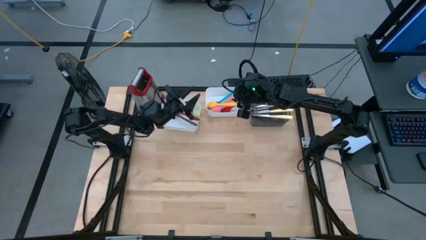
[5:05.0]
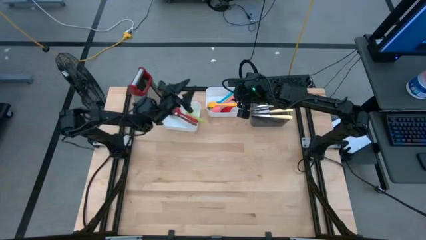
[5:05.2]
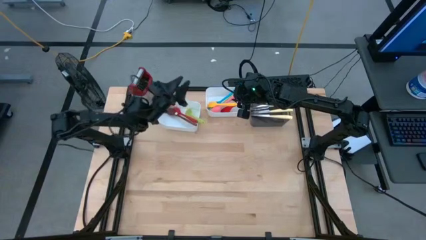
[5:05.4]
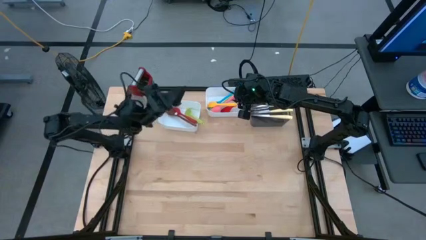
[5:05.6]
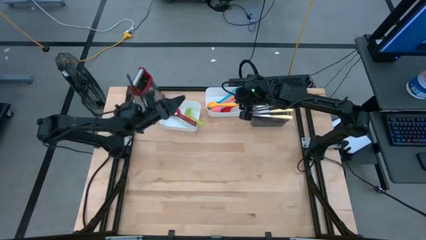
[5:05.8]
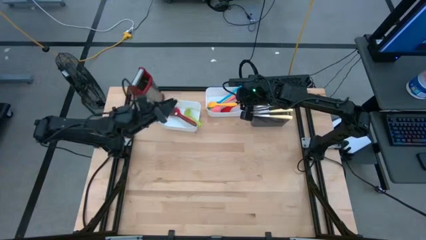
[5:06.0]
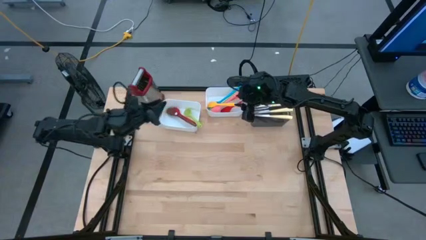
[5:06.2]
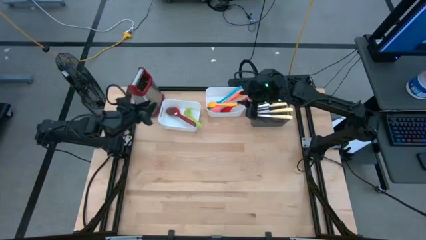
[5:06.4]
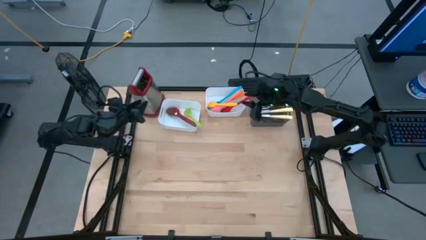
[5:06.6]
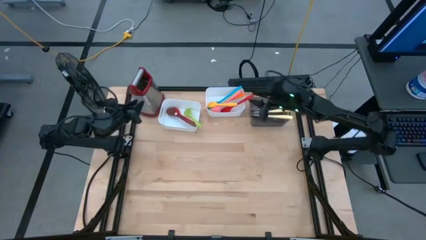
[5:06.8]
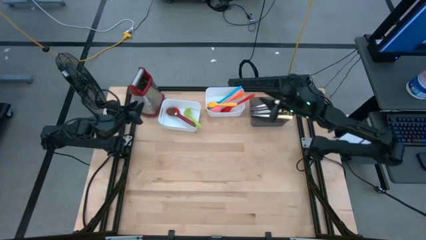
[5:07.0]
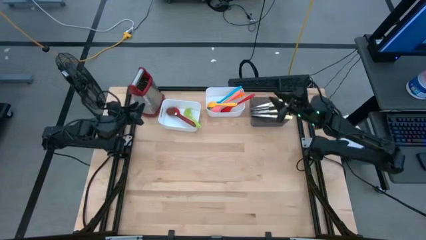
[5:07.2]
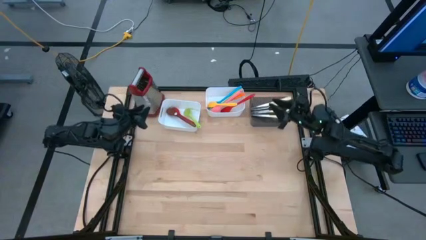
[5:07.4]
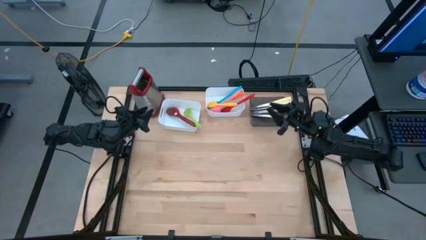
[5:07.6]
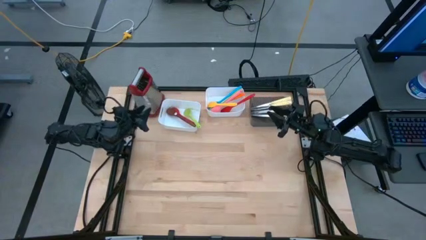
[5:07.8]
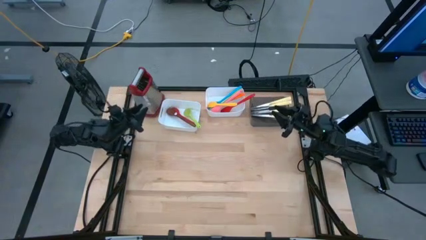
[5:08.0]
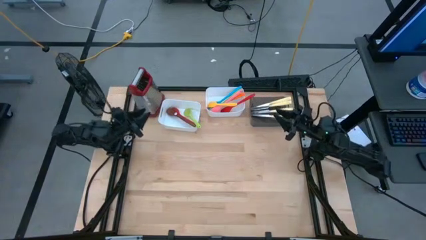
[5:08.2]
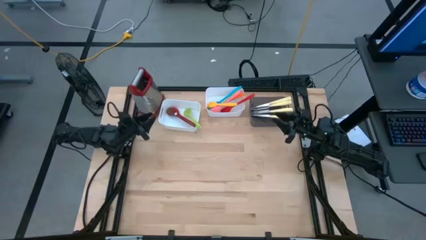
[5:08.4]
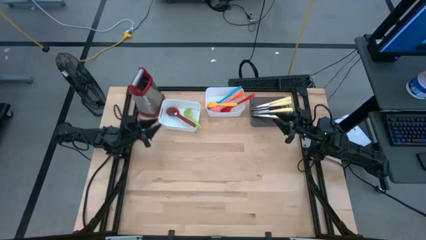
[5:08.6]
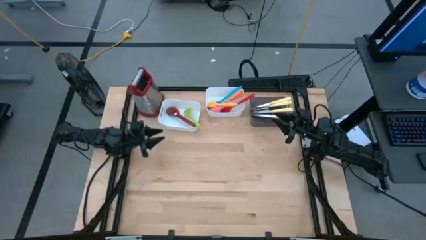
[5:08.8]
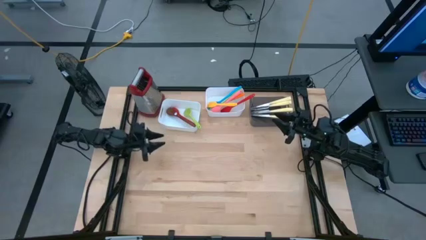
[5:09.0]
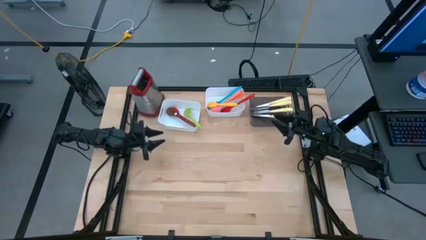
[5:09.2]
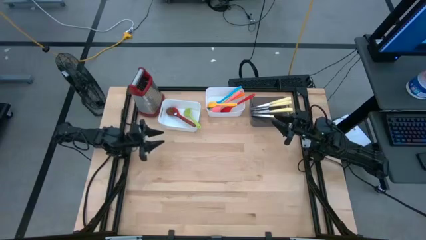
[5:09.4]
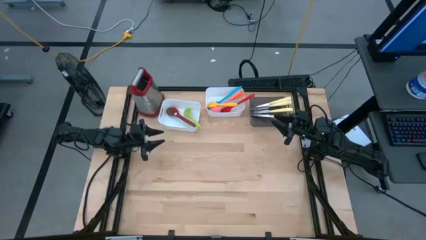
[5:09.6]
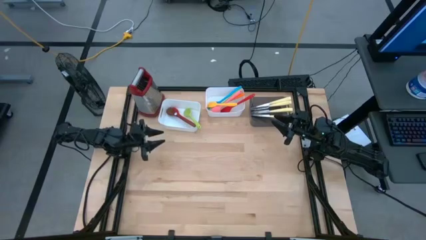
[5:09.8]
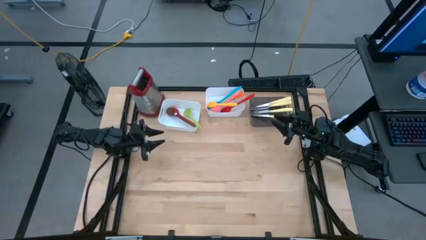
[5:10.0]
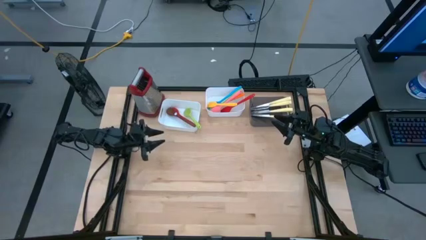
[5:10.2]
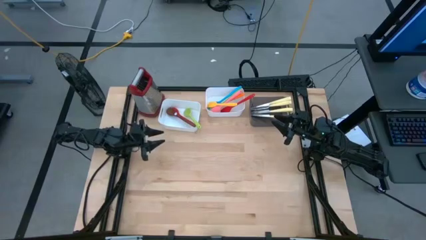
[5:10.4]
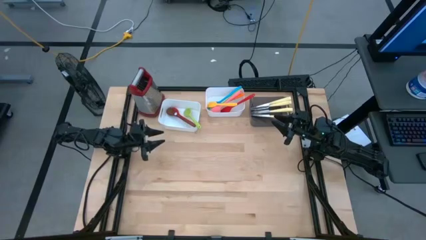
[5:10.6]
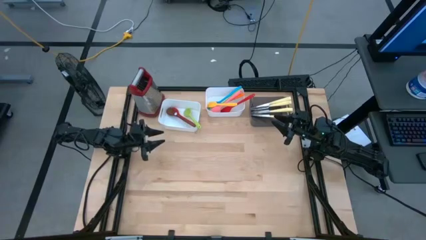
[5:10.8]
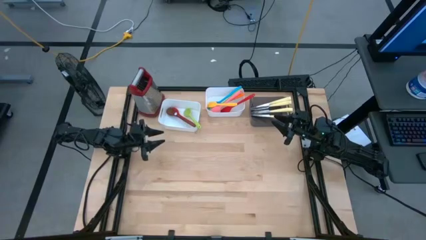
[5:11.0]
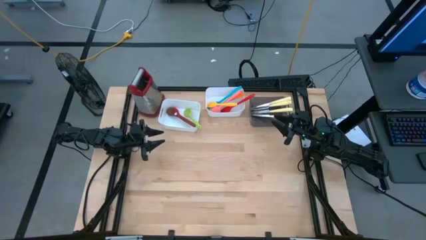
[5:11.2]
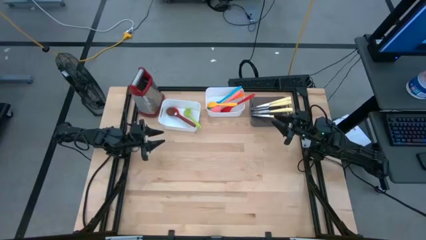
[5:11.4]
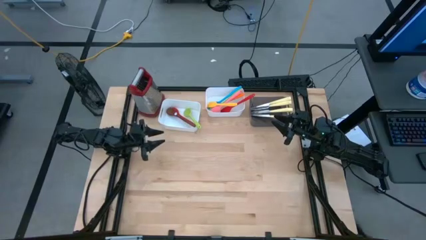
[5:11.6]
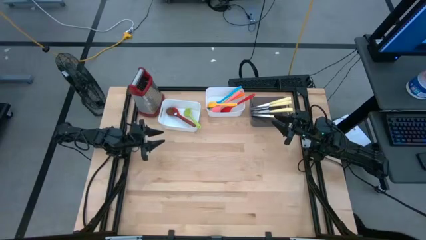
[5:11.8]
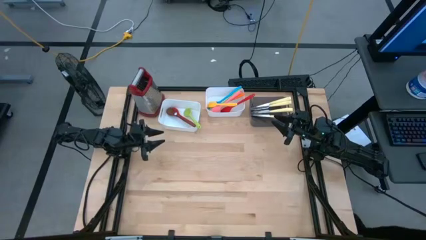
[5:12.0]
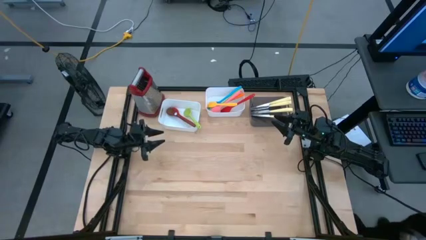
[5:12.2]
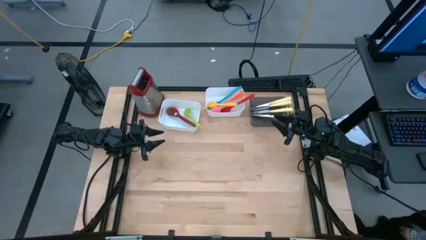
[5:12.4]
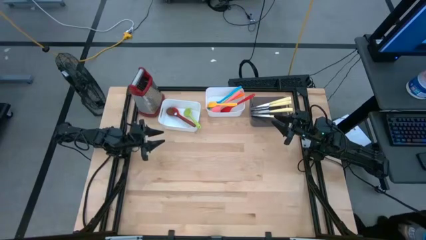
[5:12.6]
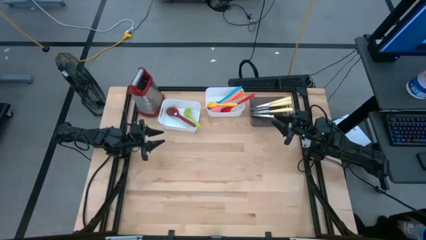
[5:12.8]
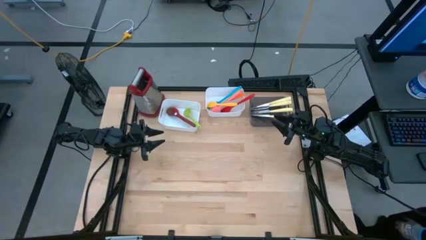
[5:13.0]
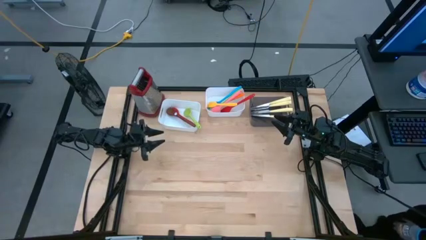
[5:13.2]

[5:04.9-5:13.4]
Task: Pick & Place Kitchen Items
Return to Home Position
